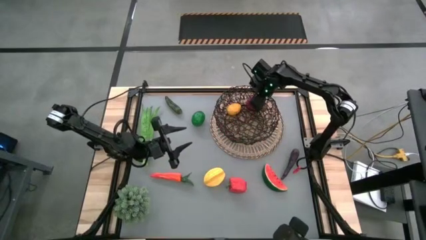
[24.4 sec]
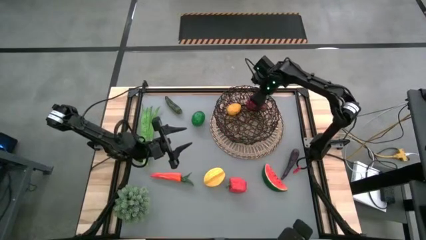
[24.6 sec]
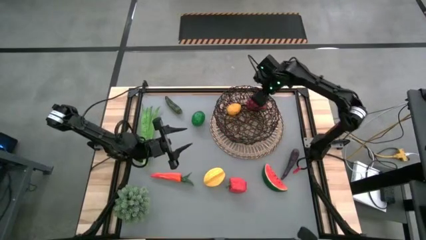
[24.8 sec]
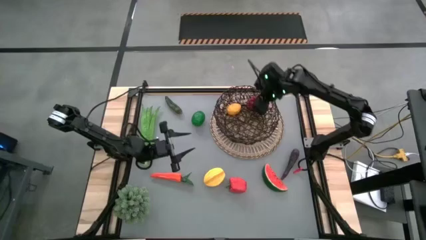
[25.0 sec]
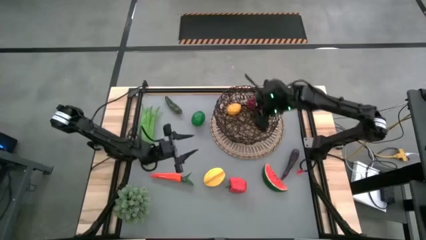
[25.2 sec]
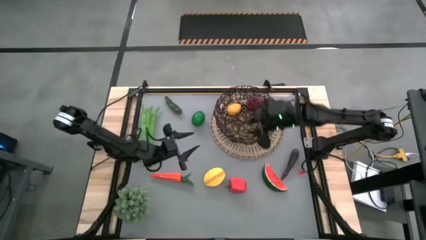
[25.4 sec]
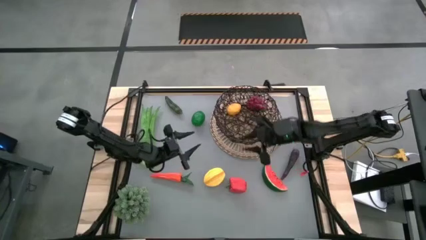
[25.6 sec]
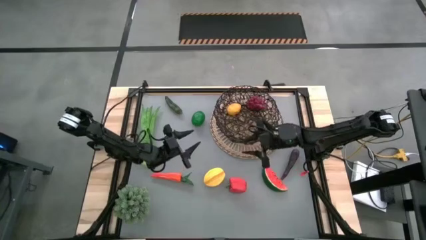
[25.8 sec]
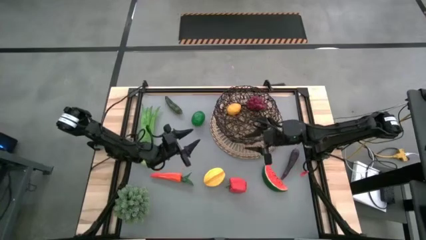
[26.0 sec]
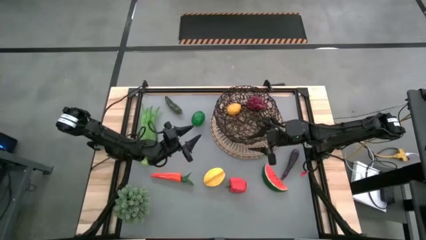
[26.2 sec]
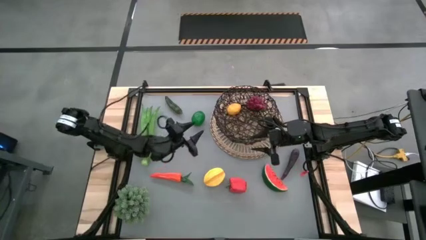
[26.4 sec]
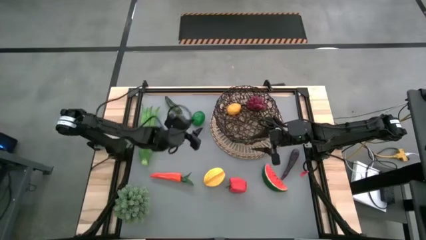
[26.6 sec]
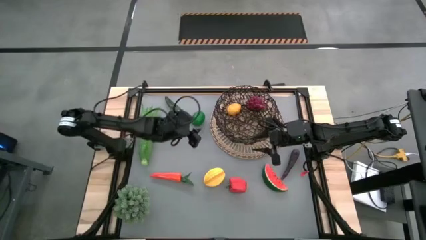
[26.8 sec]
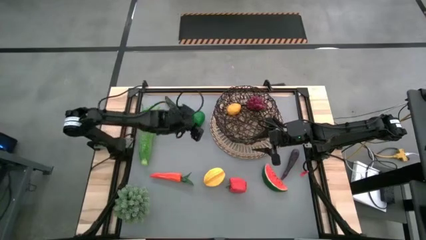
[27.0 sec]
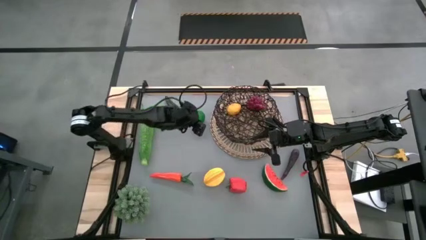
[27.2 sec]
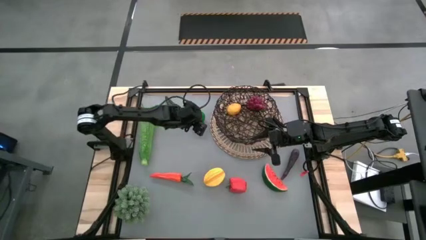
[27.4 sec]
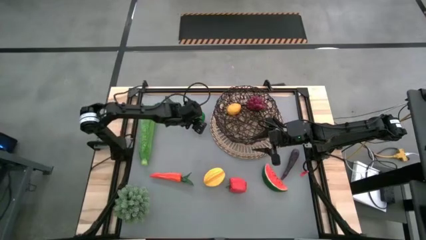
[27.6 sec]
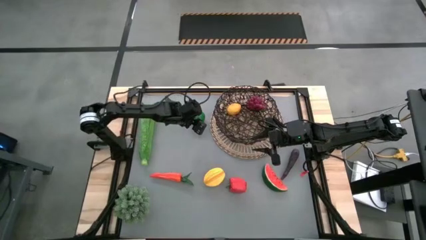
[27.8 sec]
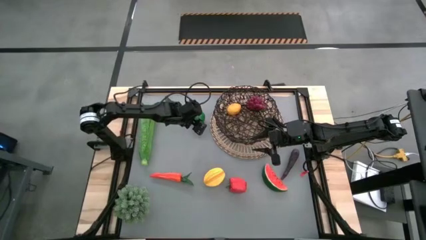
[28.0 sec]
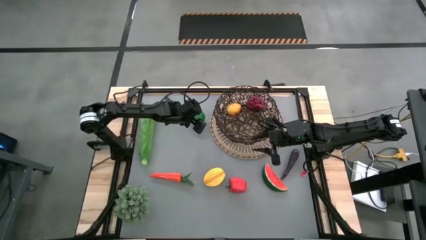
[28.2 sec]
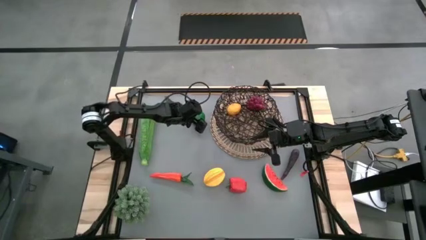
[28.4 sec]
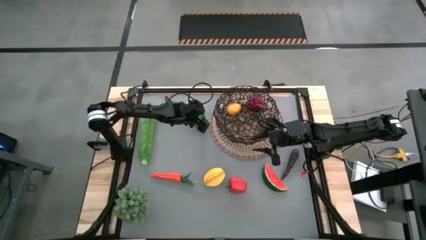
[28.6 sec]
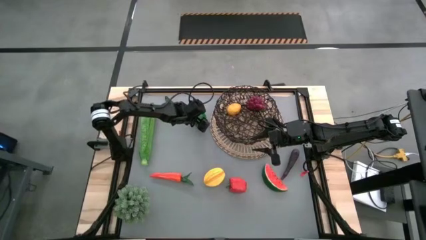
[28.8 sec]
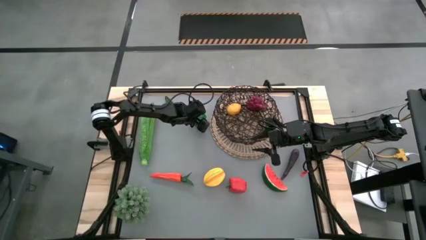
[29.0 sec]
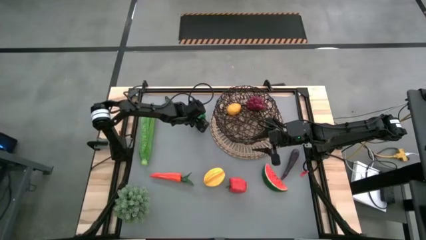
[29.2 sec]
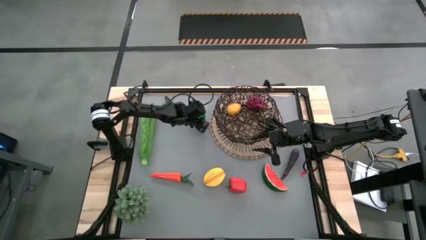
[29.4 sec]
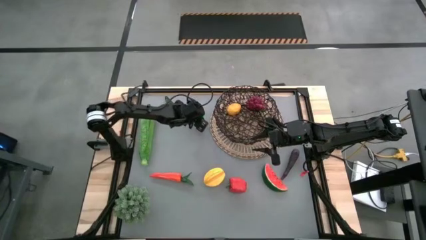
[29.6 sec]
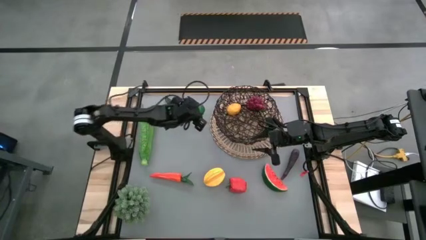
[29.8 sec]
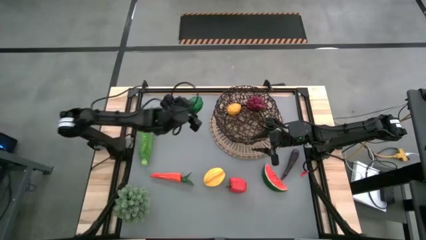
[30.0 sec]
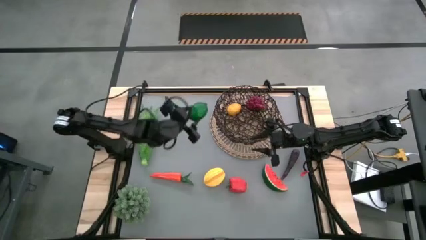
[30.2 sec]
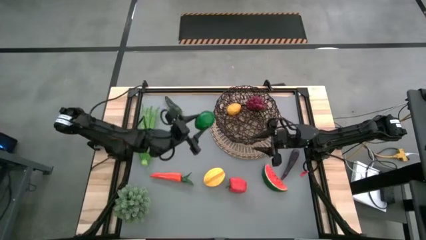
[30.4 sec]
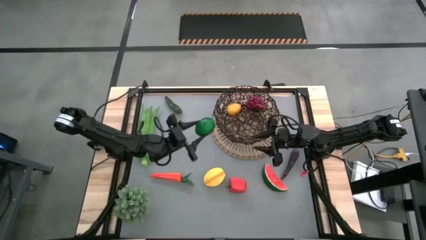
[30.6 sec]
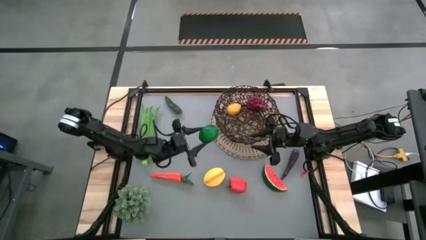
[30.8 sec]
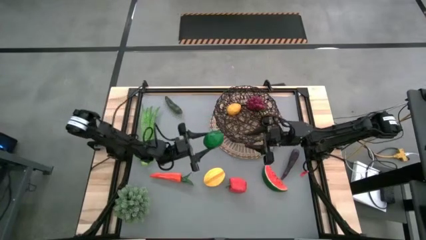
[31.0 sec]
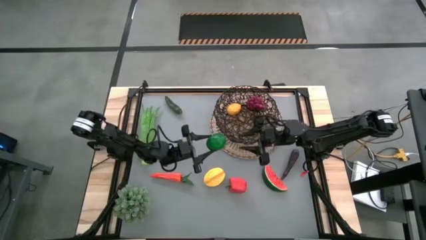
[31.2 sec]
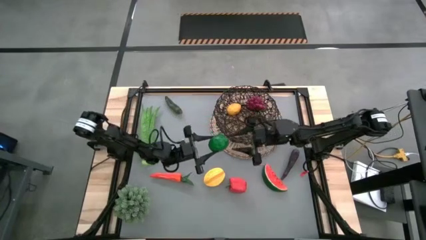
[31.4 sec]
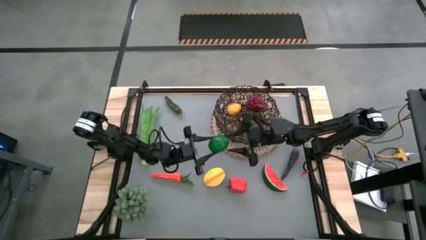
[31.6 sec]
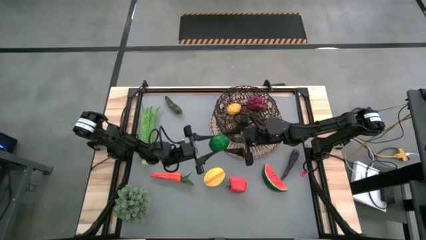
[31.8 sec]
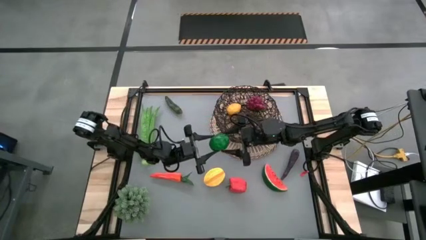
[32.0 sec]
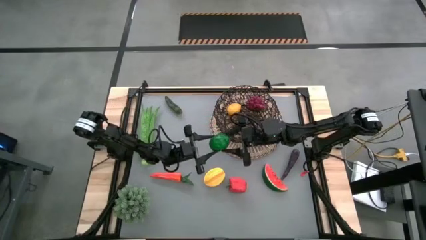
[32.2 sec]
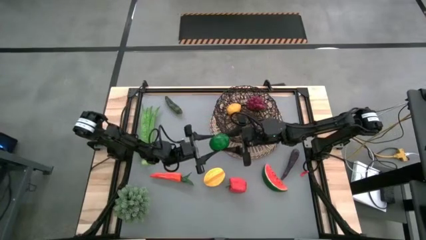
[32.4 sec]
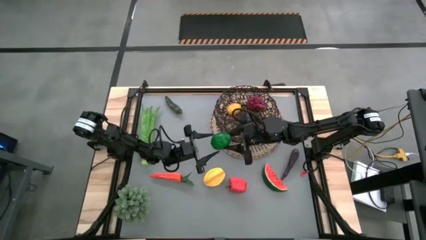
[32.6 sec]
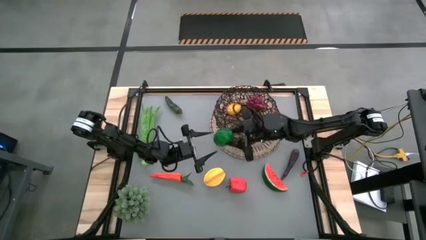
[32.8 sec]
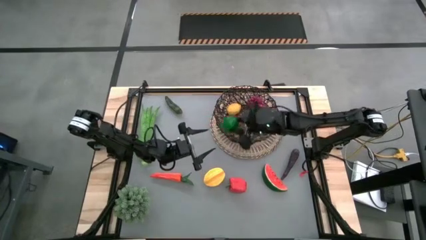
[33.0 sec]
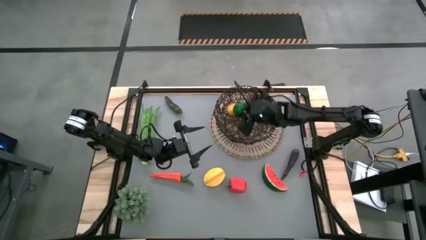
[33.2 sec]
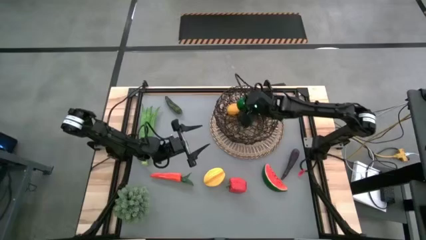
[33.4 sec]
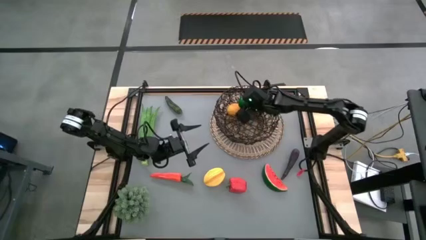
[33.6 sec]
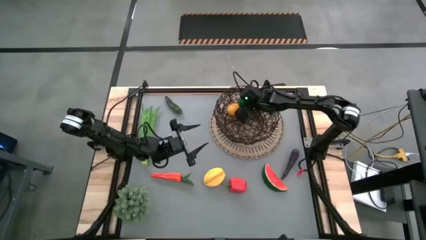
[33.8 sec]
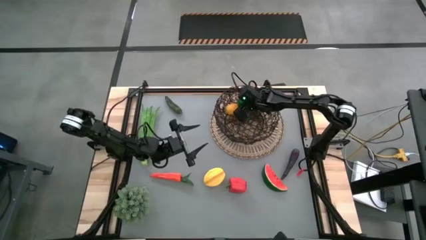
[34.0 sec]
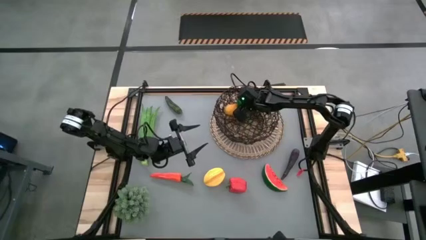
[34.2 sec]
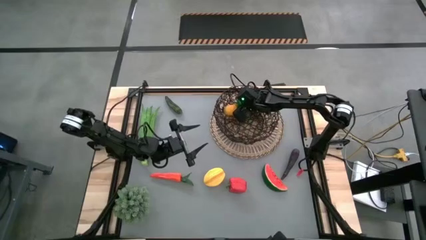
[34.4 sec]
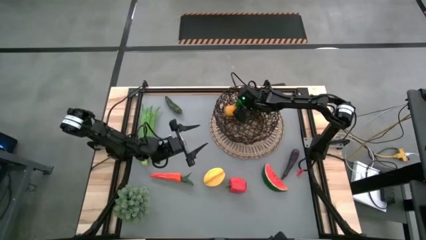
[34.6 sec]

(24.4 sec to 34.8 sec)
Task: Build produce basket
Put the green lime into the basket

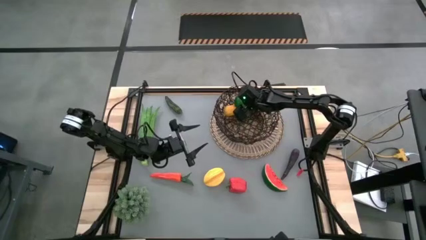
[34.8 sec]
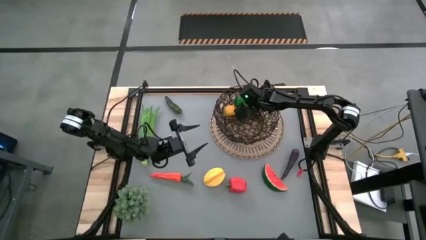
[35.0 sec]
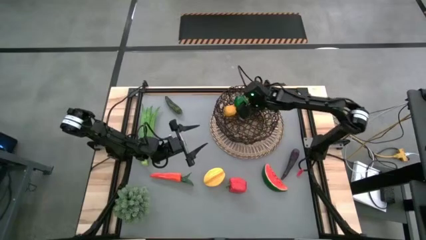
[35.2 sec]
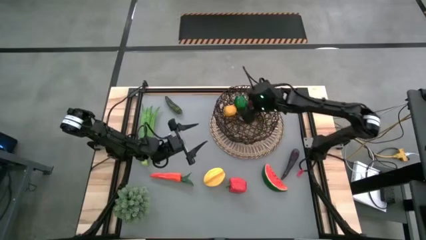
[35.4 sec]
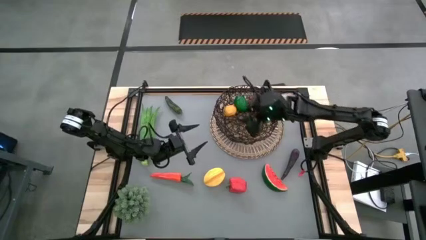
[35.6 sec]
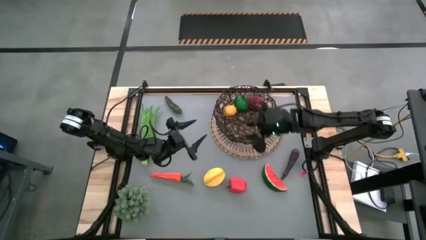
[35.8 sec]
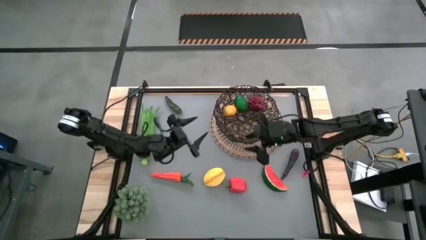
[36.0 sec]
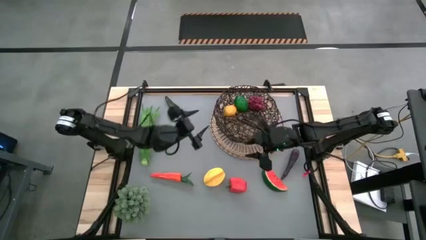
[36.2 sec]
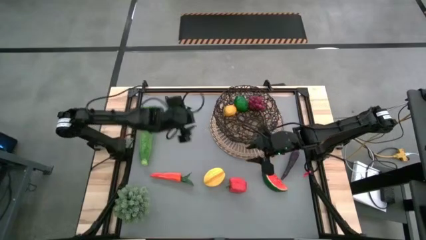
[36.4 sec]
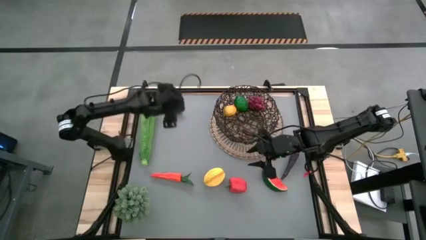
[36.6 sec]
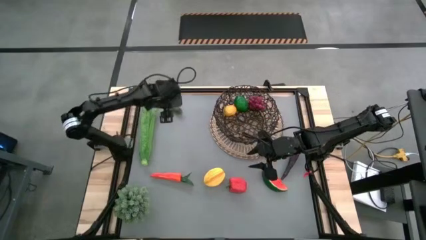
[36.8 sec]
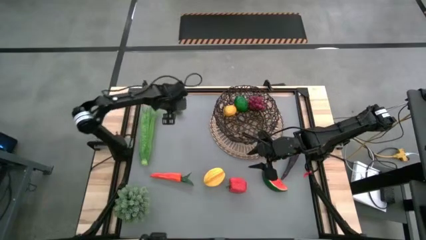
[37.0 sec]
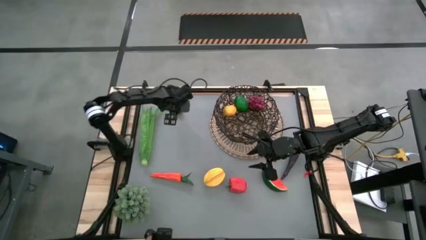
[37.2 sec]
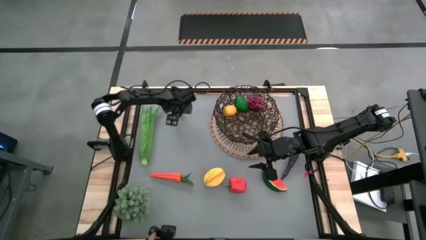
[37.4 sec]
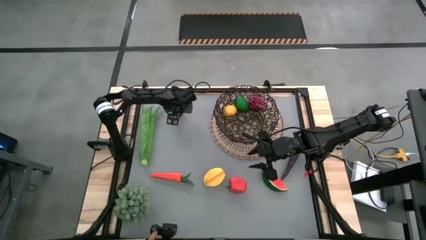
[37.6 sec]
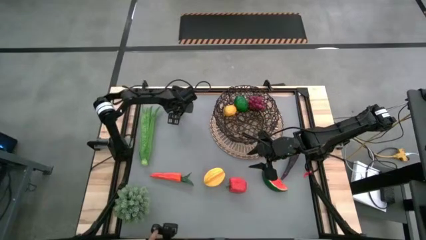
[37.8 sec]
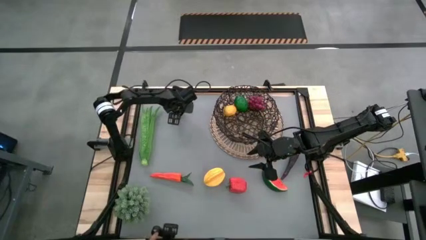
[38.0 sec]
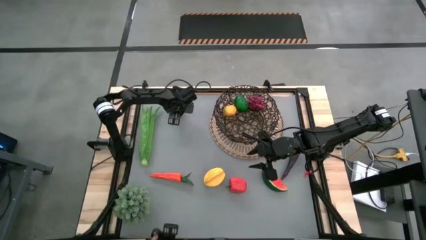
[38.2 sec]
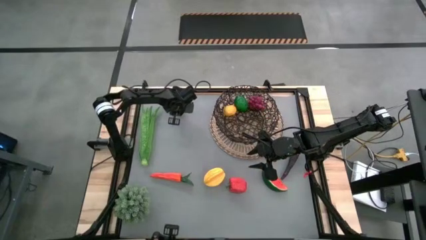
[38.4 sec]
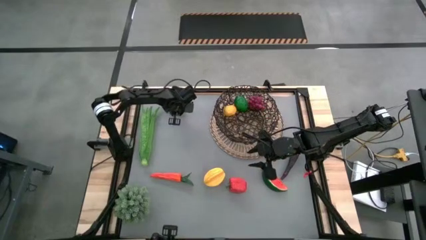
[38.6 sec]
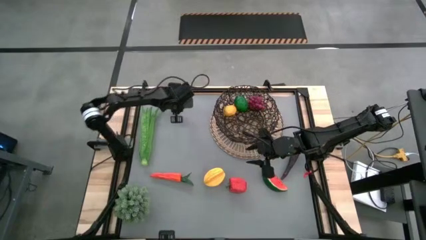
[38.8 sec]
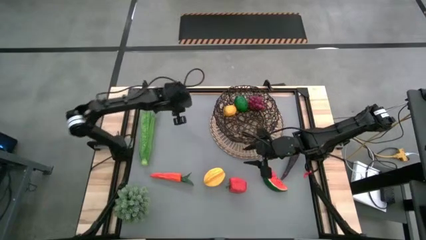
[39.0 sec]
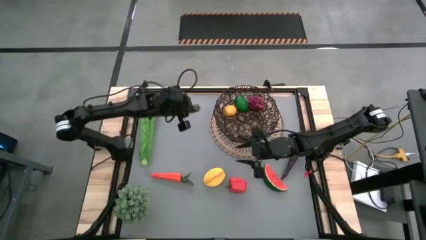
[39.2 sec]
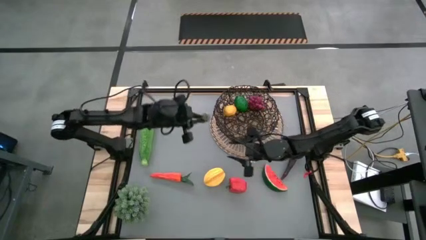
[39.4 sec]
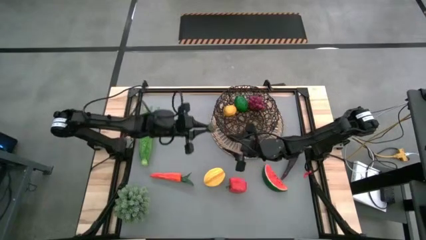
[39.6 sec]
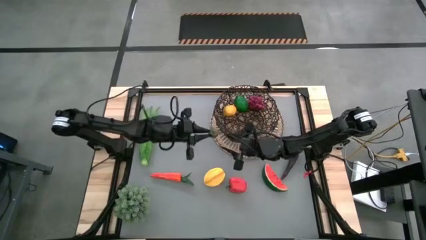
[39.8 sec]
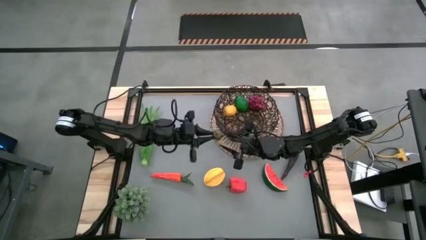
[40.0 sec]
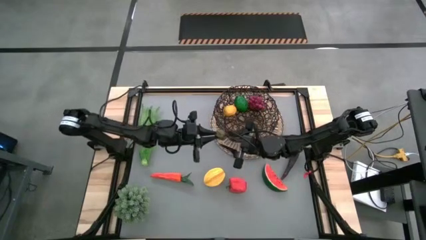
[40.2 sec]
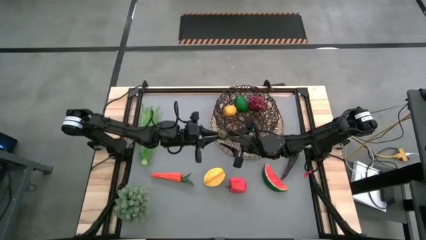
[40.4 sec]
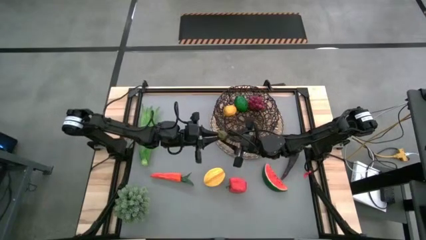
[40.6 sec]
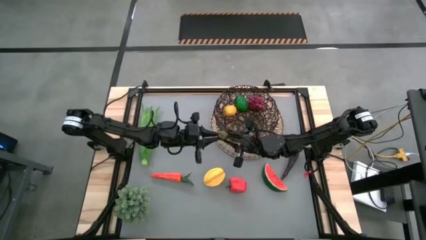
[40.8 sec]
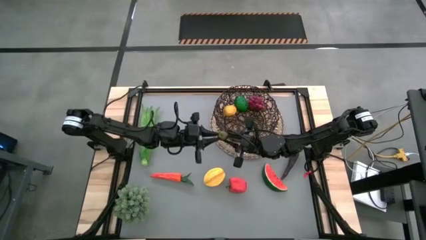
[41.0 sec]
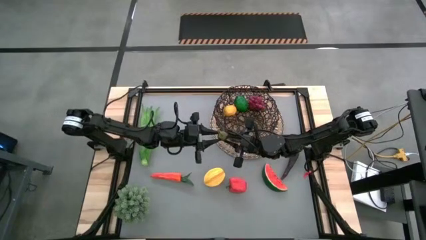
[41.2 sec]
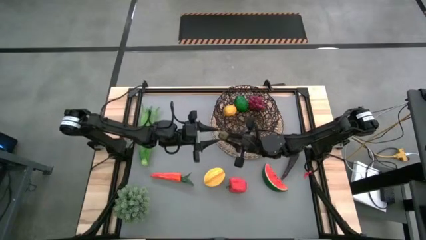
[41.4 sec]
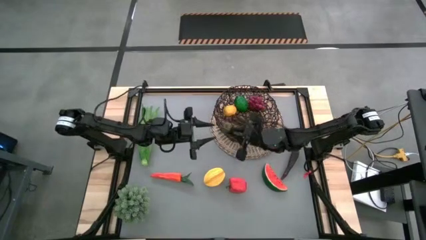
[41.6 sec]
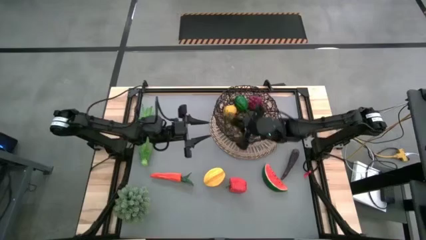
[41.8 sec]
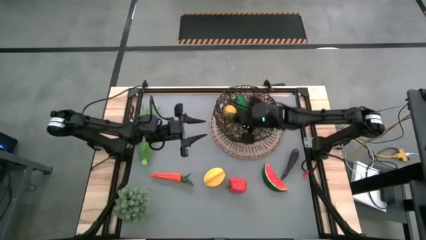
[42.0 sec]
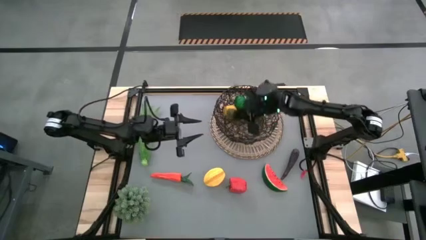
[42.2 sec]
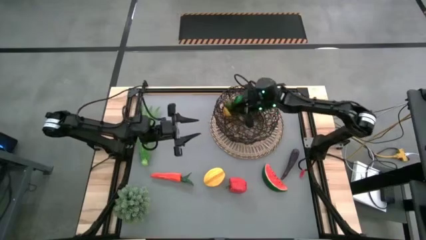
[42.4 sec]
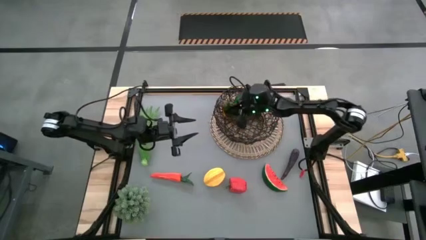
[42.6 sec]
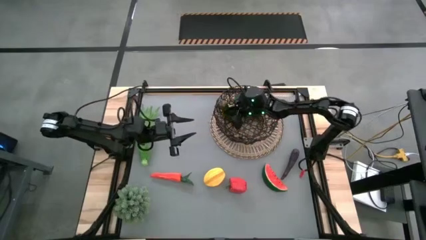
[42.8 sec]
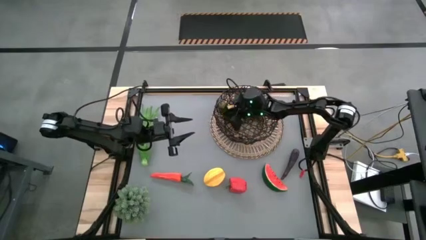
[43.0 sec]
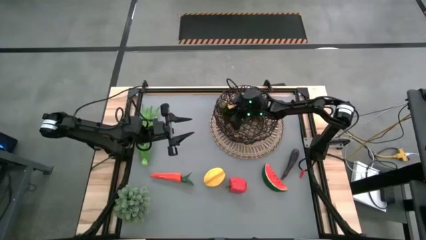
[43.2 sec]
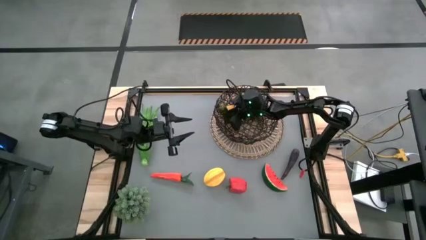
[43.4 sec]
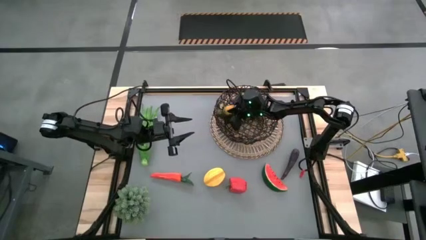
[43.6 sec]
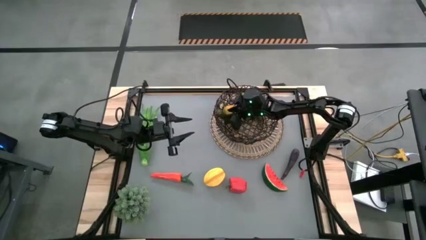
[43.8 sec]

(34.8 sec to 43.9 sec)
Put the green chili pepper into the basket
